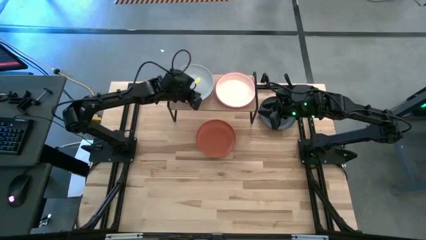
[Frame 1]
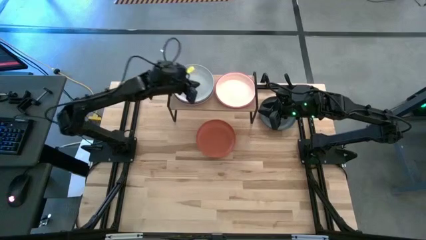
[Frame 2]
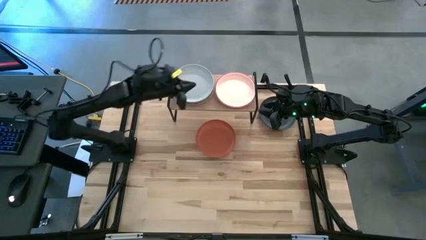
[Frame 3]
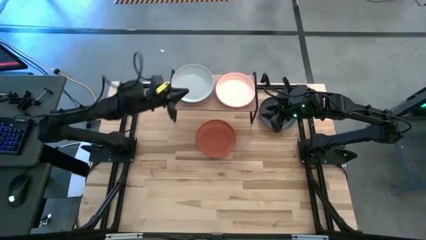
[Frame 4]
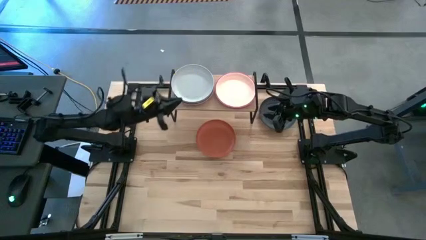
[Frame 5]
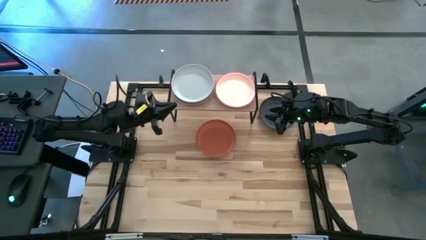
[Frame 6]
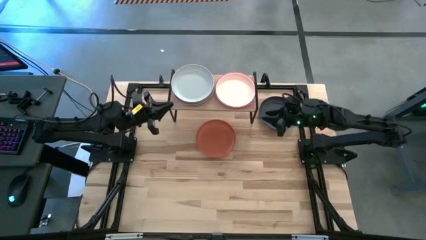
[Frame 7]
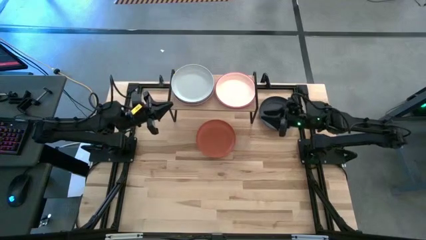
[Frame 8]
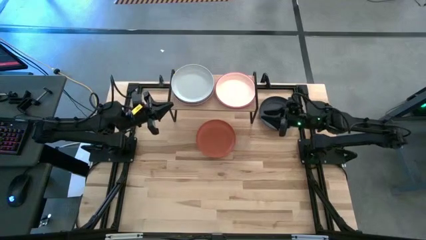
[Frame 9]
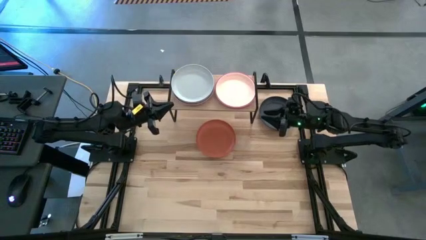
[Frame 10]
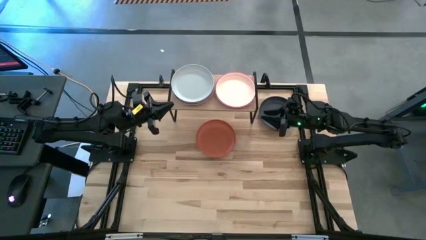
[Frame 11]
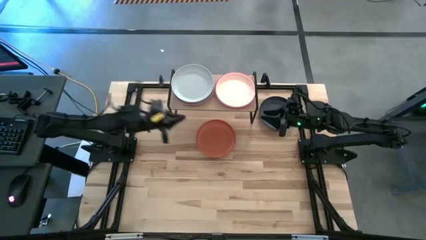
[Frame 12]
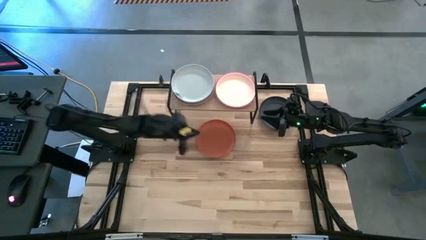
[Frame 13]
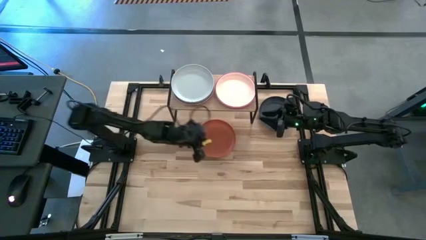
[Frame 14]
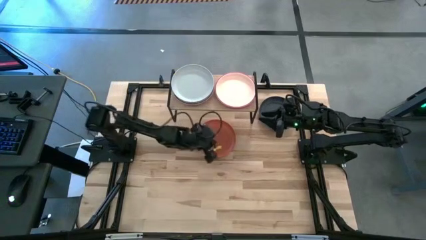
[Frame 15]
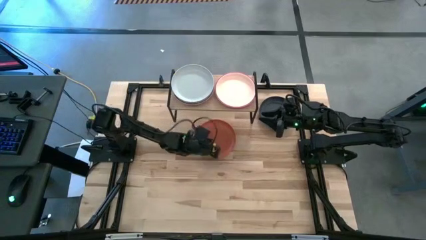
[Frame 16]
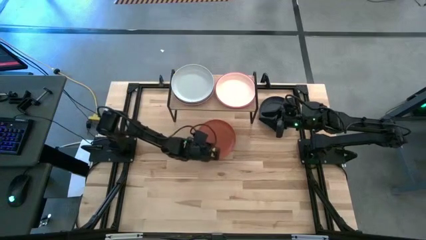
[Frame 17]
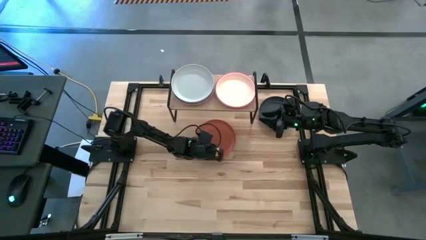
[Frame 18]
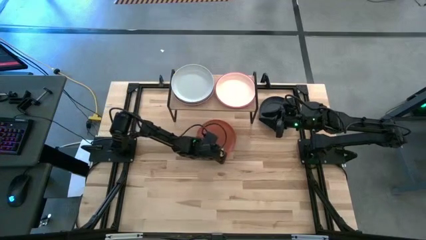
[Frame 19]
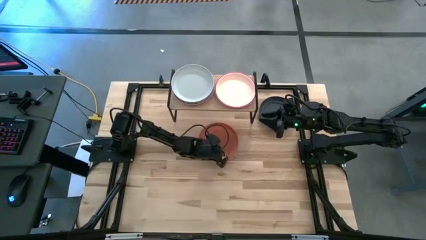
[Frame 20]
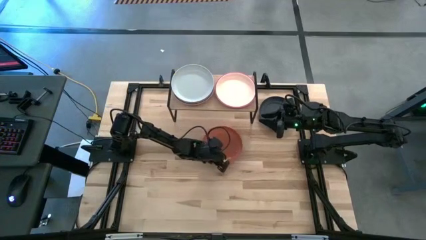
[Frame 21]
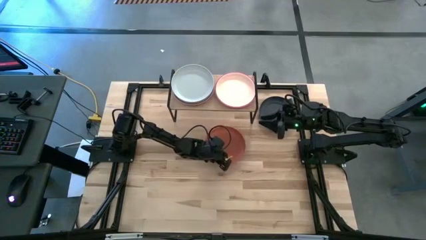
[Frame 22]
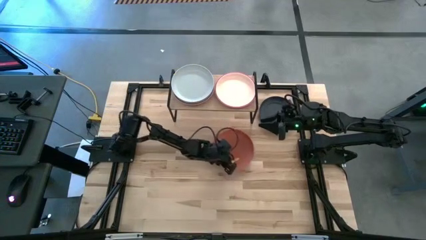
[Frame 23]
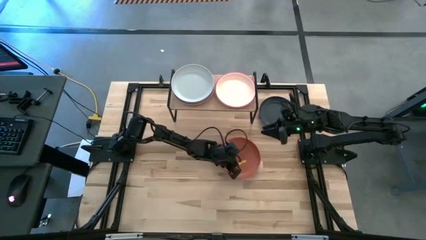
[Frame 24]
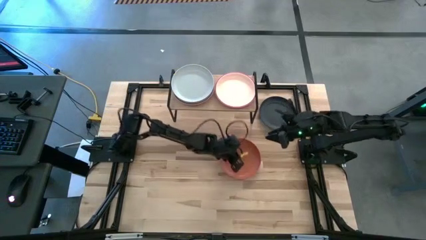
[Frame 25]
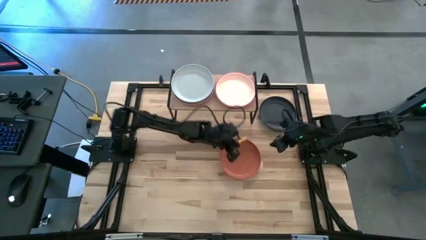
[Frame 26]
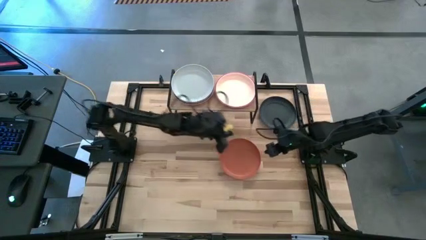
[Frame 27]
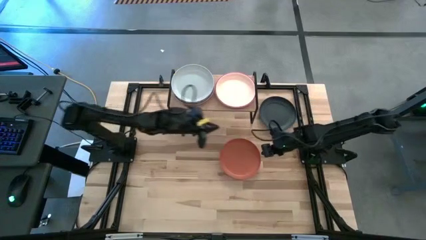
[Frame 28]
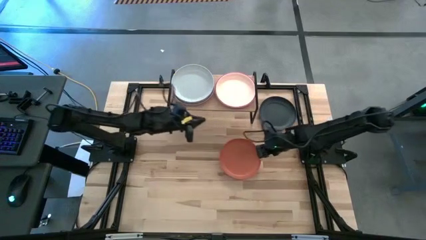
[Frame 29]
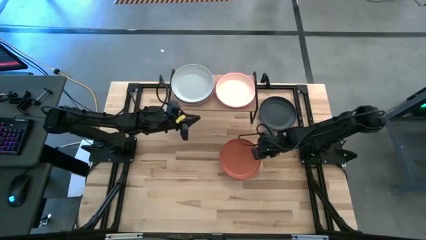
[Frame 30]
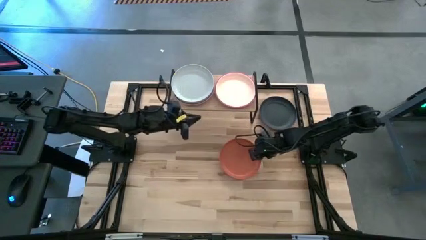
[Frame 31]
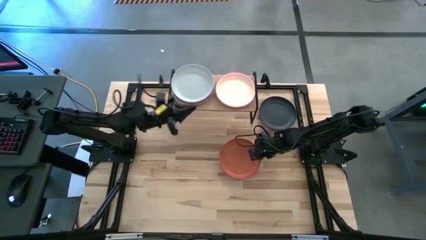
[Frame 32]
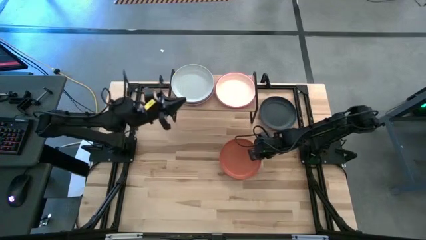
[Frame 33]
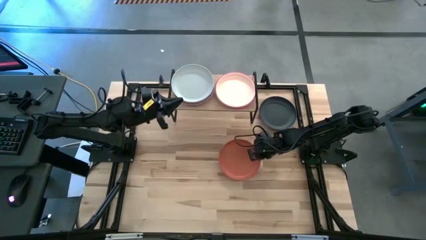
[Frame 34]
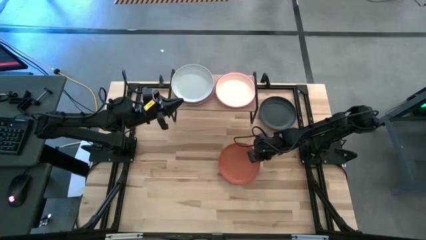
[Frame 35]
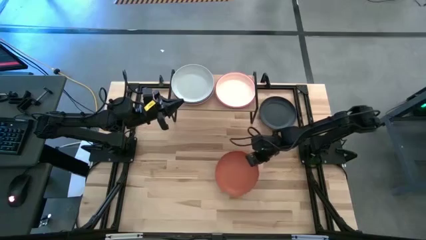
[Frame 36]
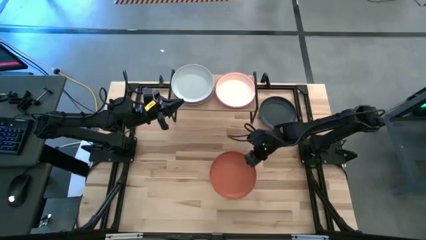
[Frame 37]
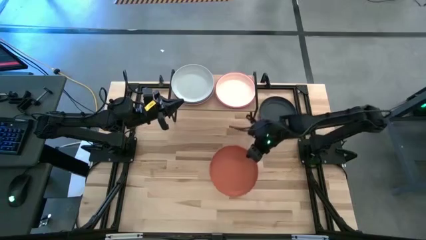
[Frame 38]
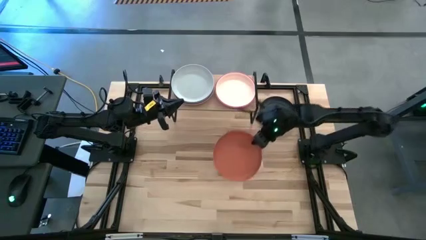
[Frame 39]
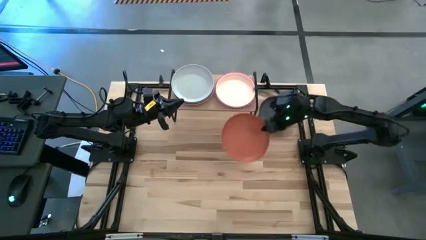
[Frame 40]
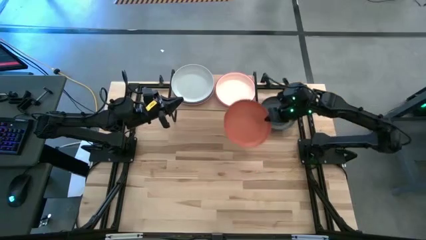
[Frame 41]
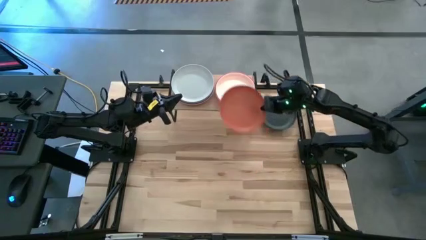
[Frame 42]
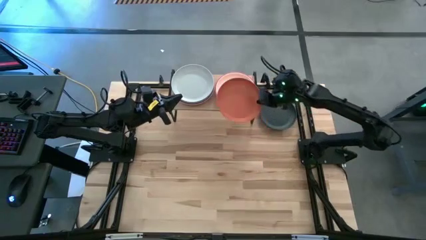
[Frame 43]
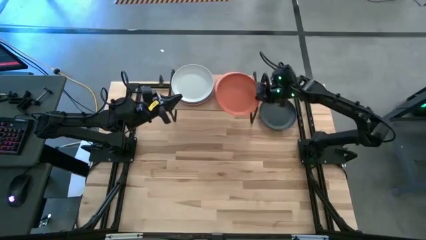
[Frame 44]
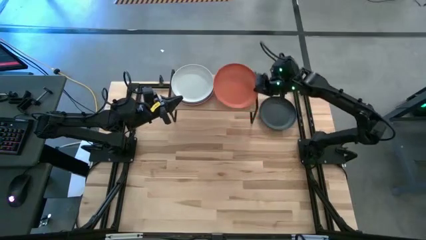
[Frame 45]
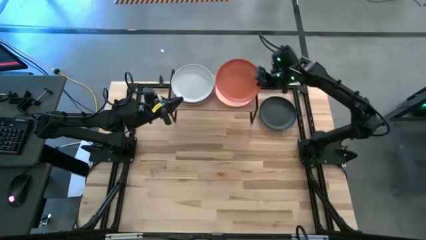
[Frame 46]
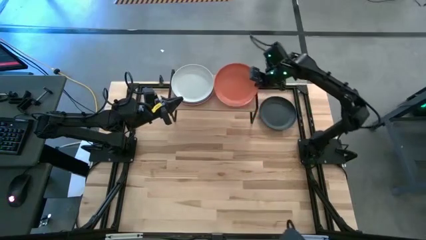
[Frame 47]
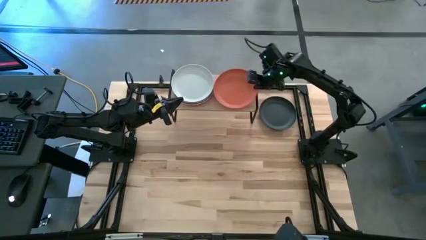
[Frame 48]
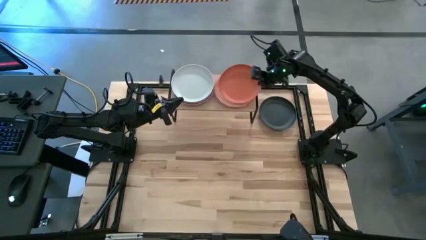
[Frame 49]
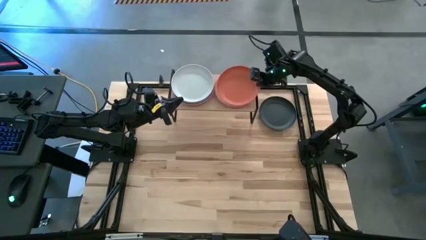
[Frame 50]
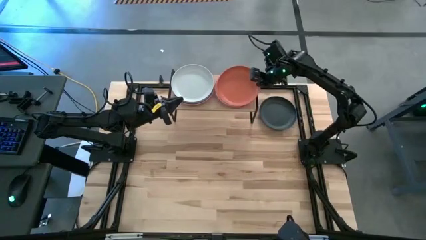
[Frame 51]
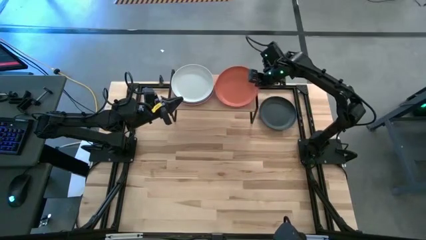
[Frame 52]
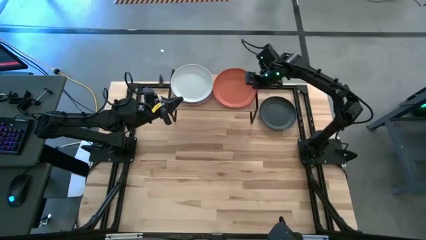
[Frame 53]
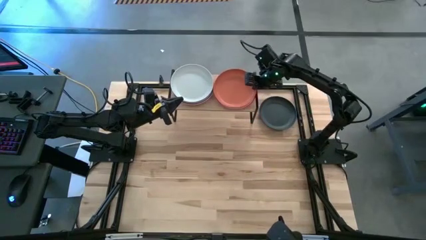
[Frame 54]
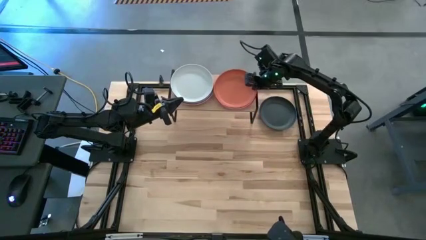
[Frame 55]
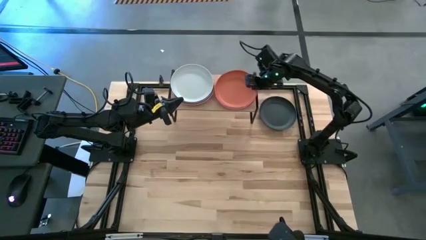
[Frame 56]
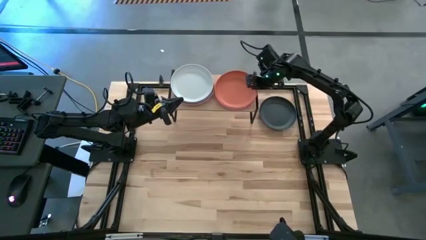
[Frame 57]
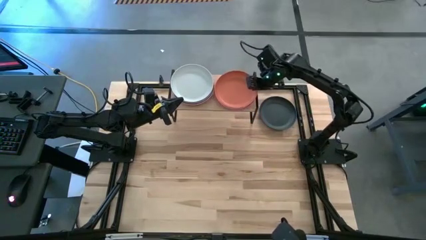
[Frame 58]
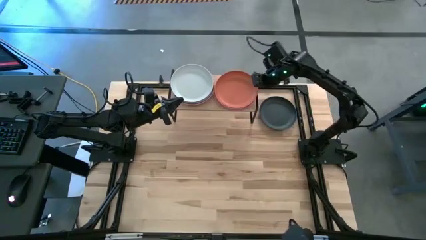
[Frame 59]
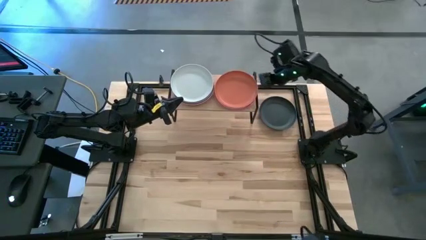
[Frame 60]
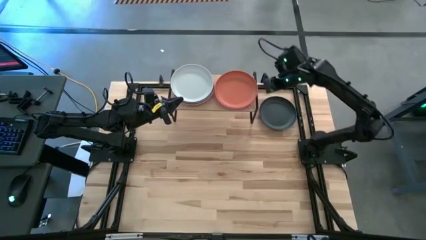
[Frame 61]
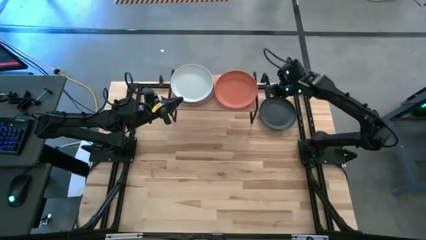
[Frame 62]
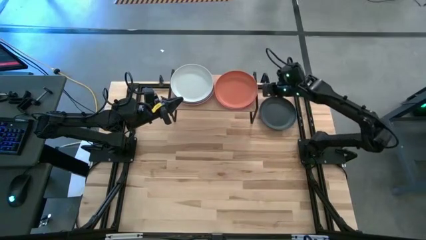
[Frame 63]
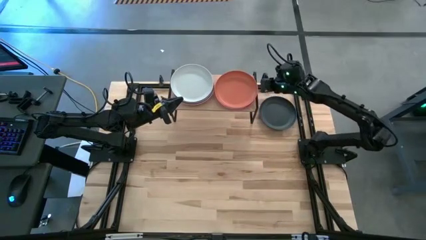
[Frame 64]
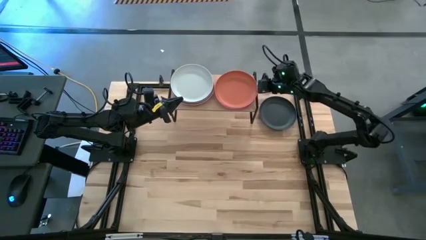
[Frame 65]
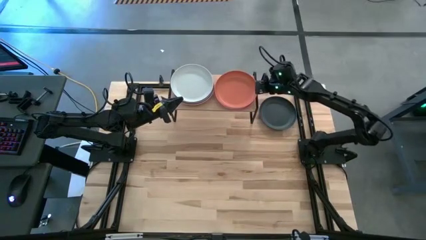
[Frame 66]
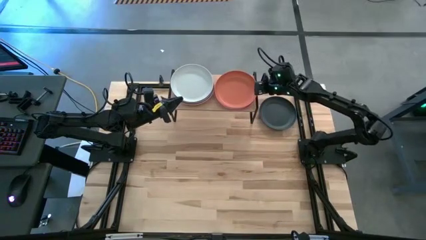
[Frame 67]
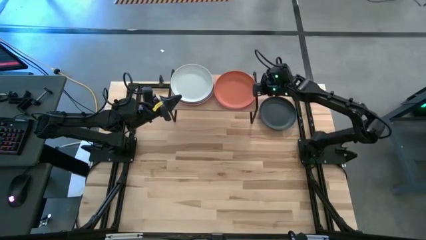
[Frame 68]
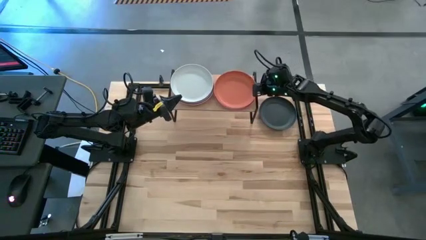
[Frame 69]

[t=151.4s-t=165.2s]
Task: Place and stack plates onto a shelf
Stack the brown plate on the light orange plate

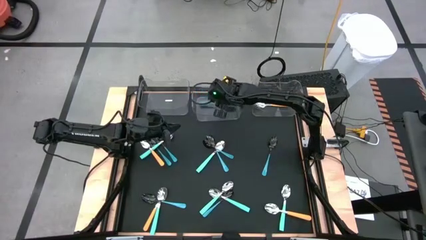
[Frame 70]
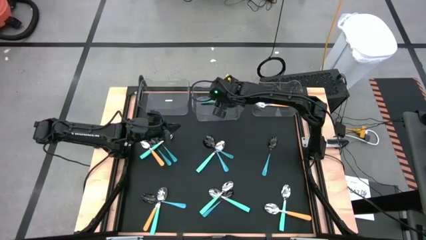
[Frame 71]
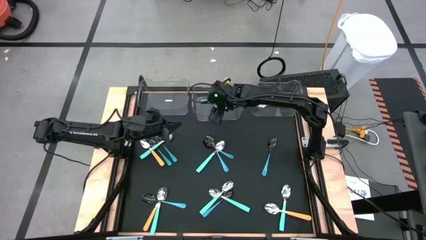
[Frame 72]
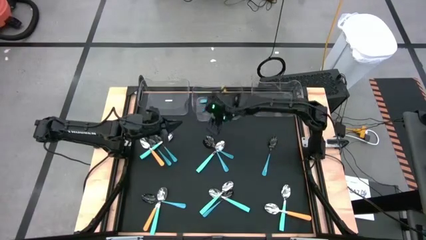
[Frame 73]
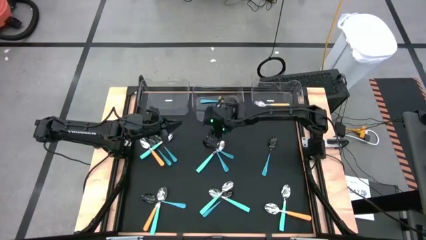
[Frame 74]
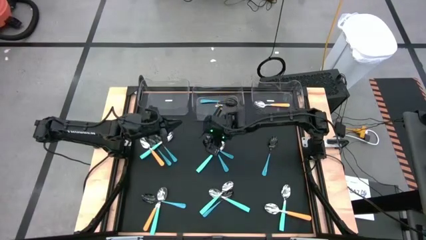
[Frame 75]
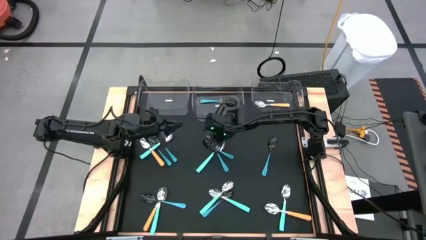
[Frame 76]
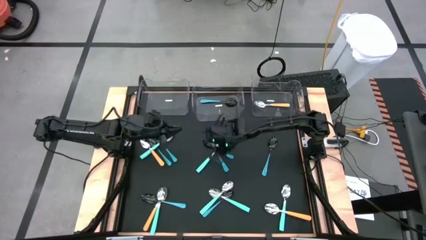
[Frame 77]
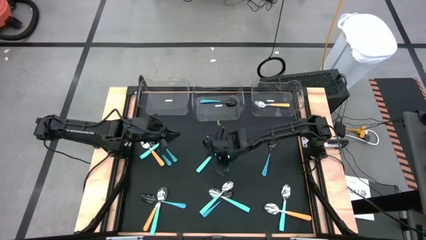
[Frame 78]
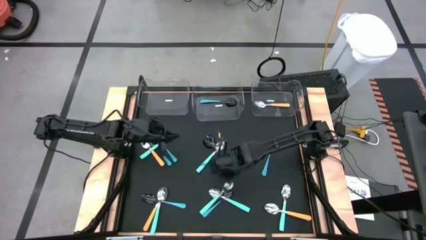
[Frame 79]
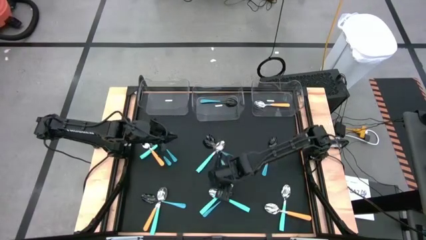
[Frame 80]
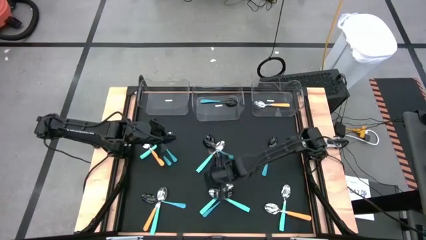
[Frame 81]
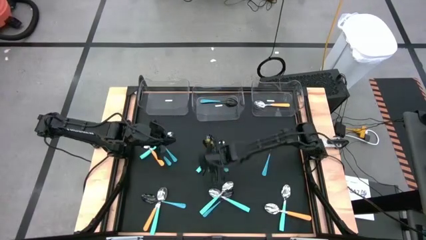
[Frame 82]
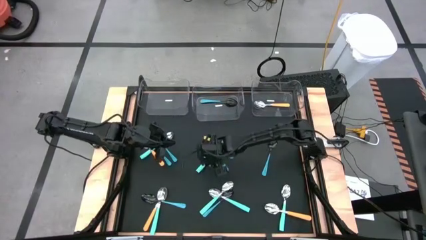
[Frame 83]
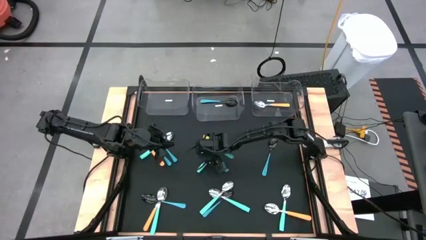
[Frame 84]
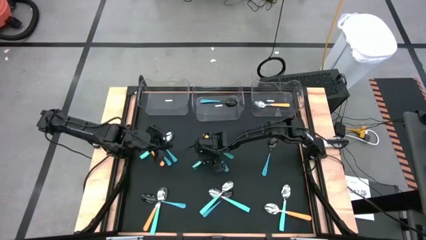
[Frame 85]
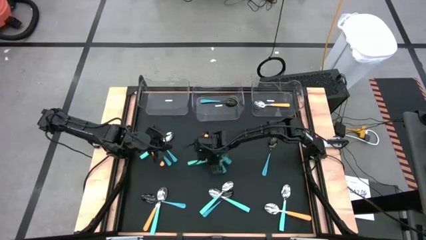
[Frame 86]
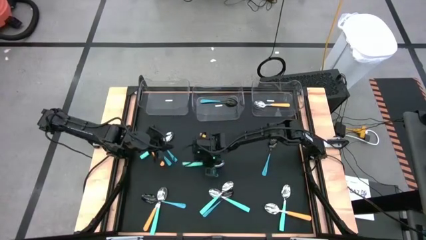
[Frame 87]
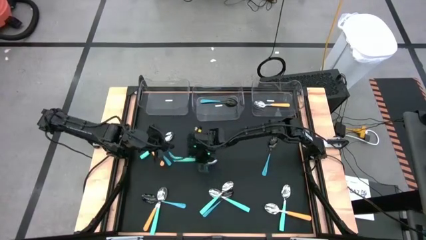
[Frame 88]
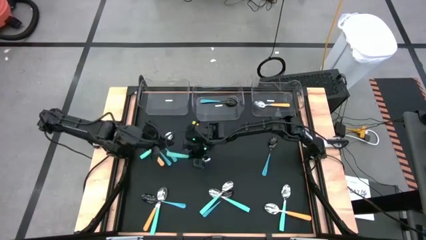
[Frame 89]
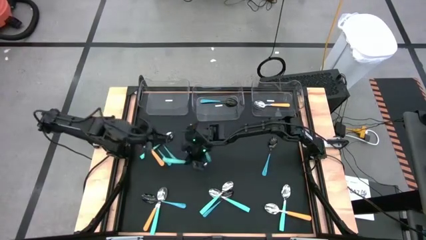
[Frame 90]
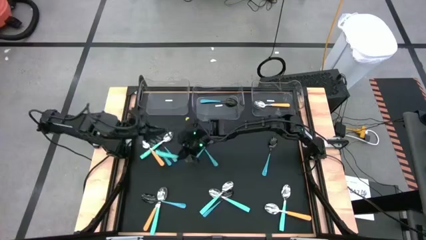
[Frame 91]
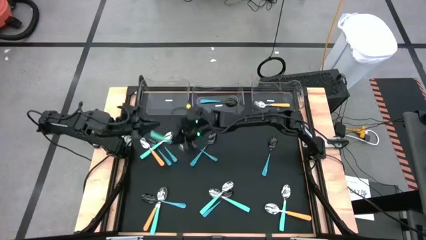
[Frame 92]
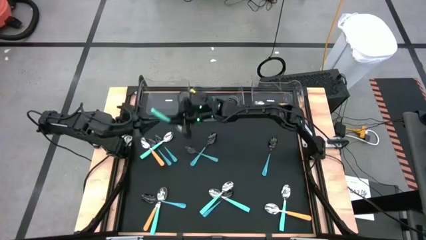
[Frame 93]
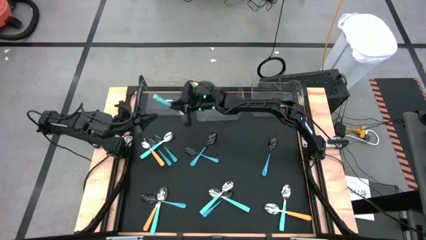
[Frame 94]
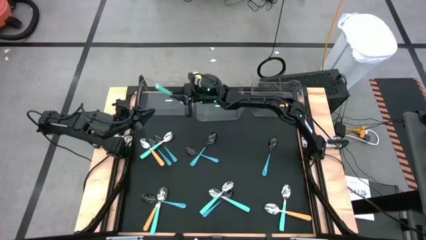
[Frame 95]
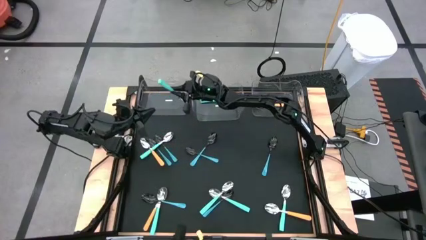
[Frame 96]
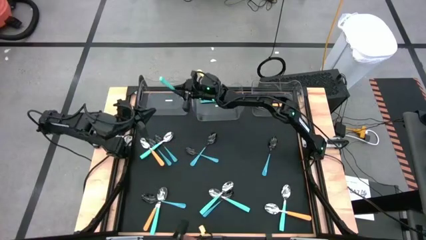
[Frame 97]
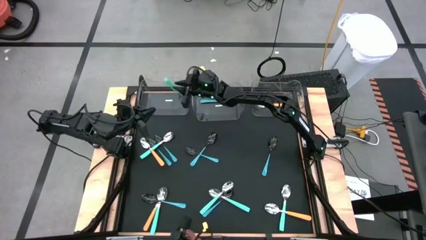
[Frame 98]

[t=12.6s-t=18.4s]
Task: Sort silverware by color (type)
Put the light blue spoon into the left transparent bin
